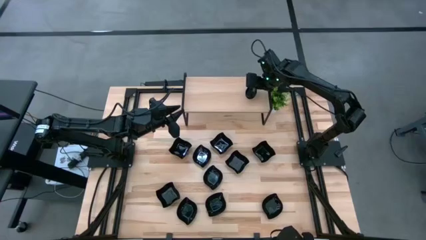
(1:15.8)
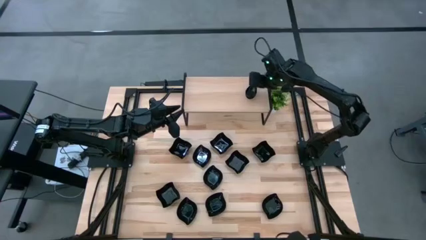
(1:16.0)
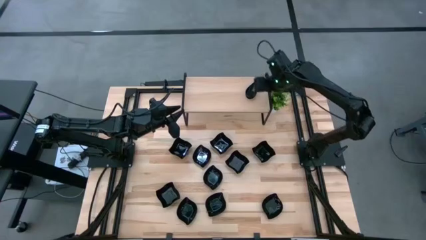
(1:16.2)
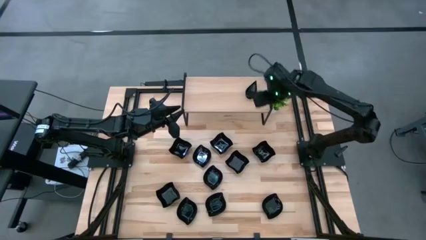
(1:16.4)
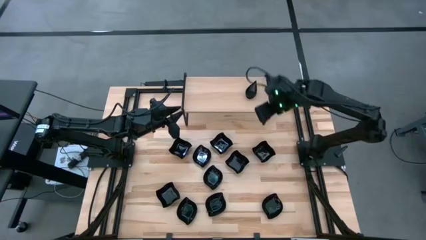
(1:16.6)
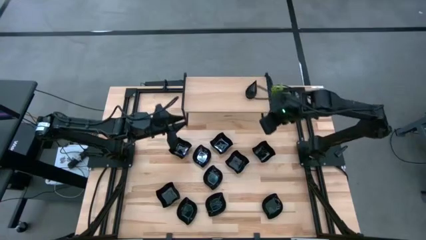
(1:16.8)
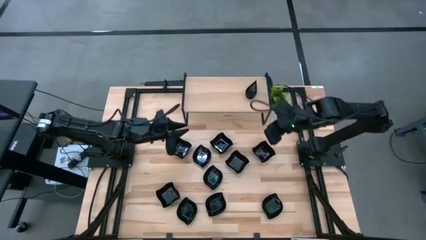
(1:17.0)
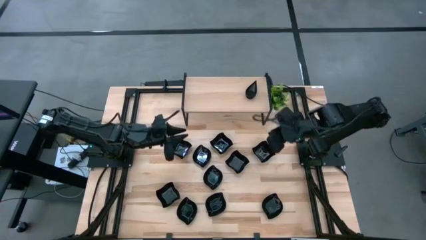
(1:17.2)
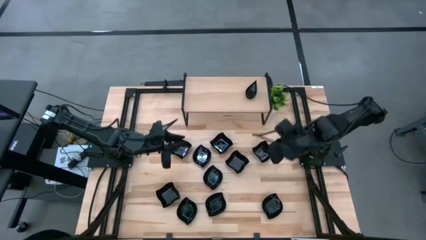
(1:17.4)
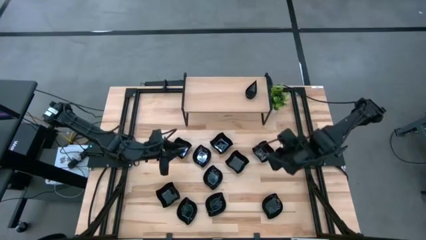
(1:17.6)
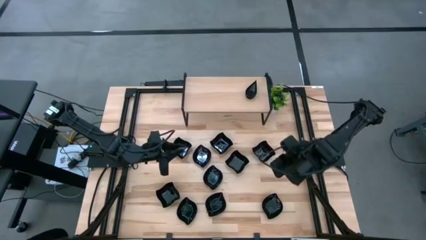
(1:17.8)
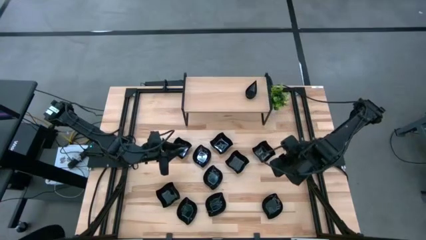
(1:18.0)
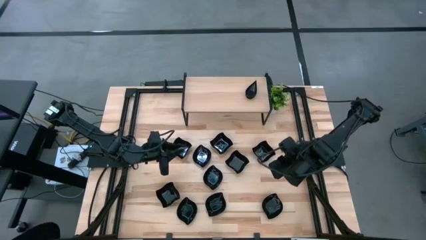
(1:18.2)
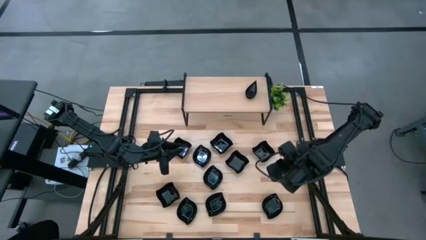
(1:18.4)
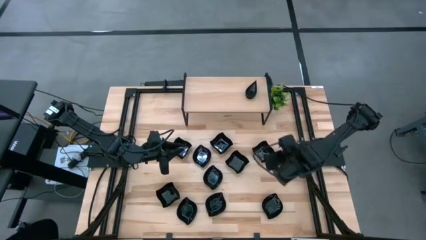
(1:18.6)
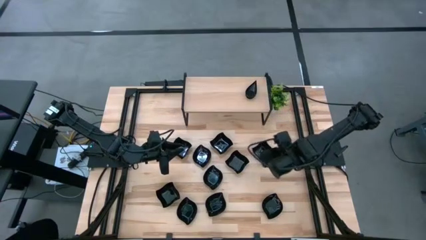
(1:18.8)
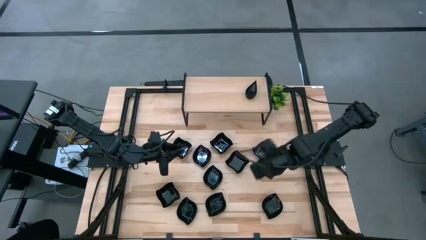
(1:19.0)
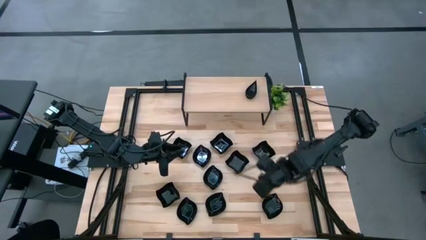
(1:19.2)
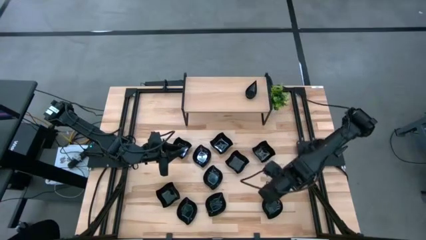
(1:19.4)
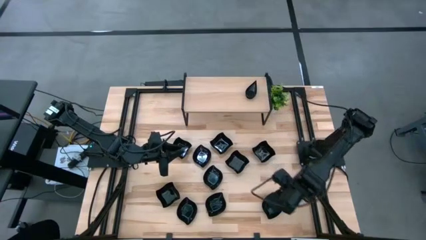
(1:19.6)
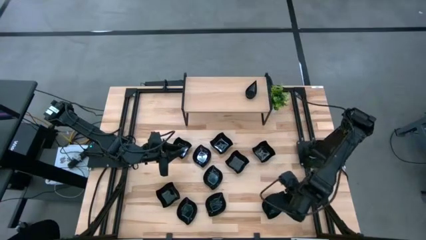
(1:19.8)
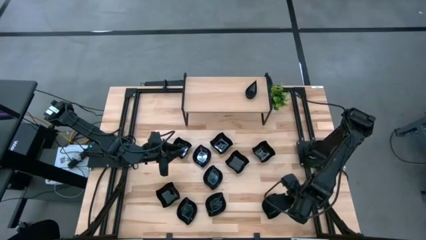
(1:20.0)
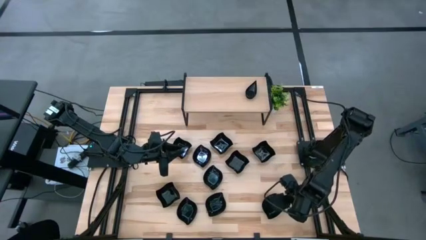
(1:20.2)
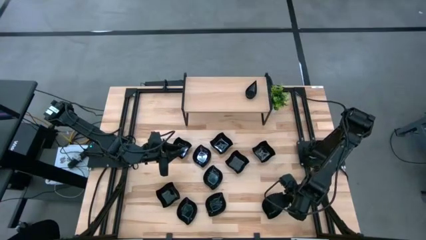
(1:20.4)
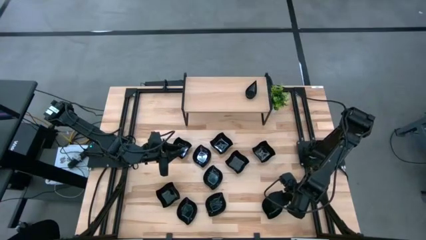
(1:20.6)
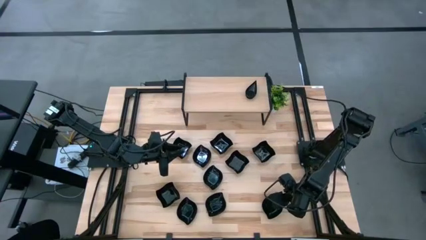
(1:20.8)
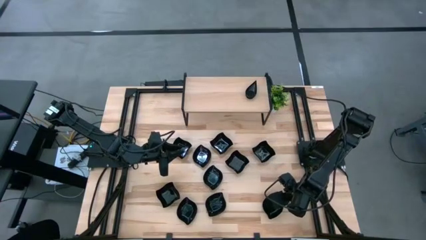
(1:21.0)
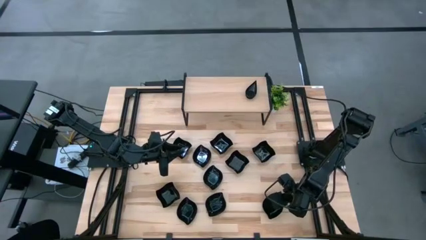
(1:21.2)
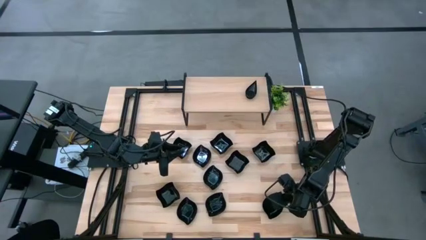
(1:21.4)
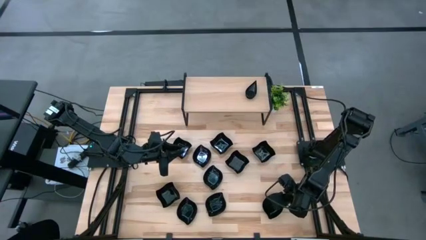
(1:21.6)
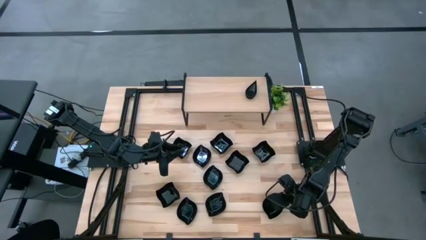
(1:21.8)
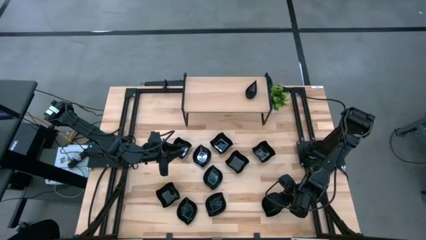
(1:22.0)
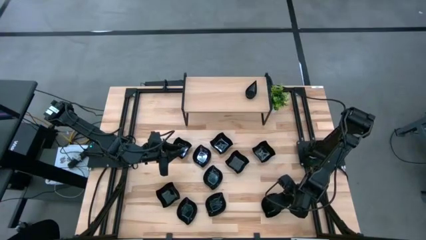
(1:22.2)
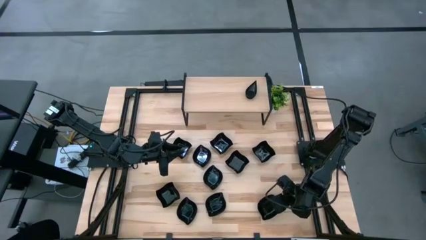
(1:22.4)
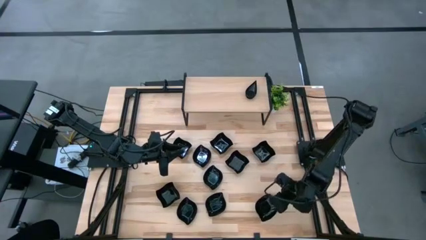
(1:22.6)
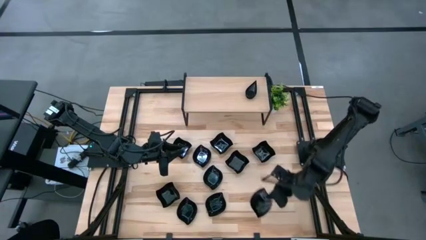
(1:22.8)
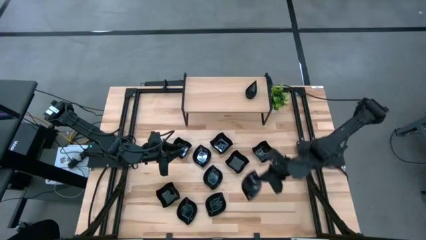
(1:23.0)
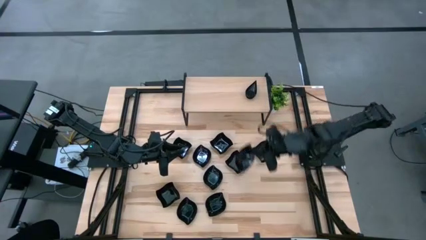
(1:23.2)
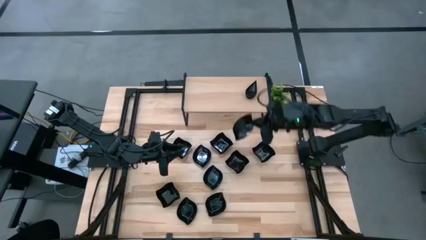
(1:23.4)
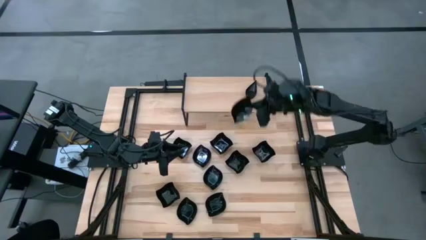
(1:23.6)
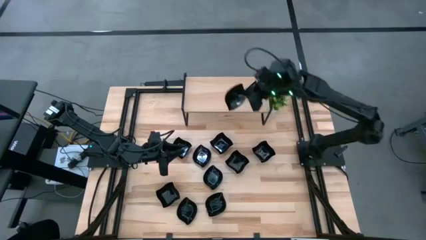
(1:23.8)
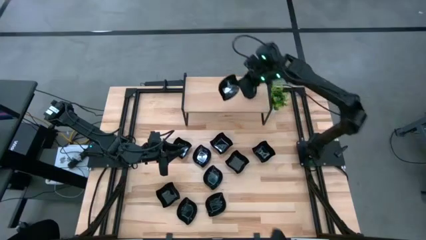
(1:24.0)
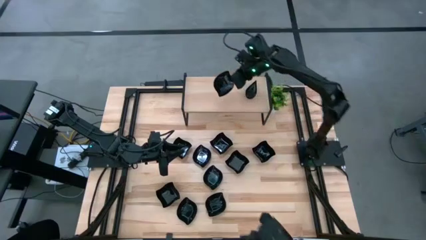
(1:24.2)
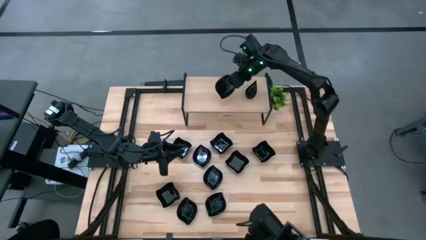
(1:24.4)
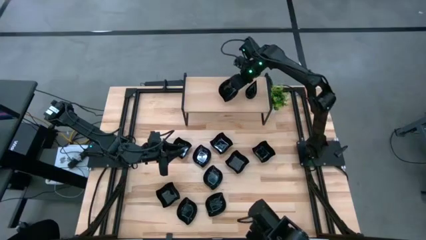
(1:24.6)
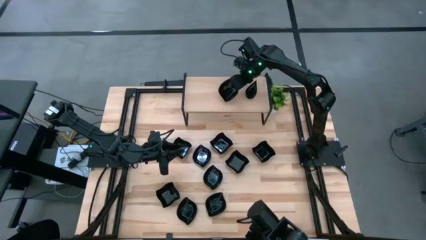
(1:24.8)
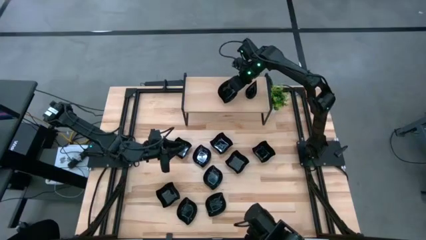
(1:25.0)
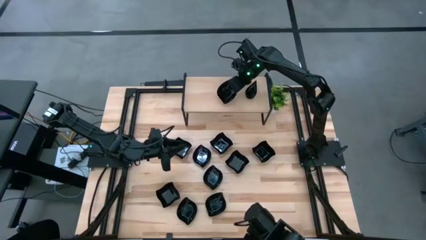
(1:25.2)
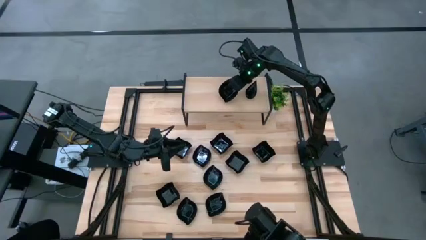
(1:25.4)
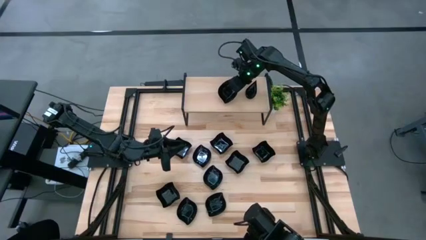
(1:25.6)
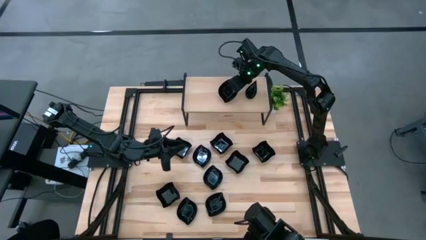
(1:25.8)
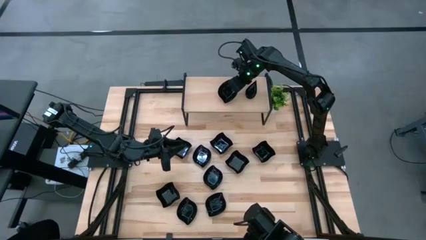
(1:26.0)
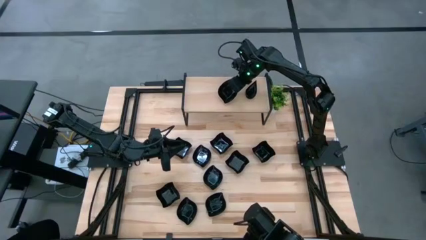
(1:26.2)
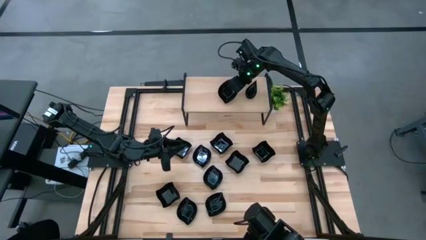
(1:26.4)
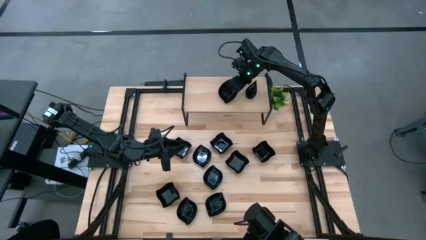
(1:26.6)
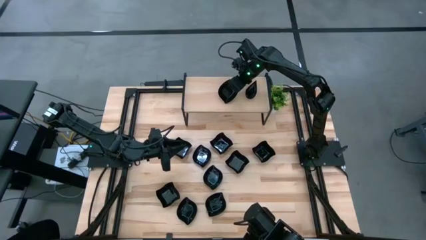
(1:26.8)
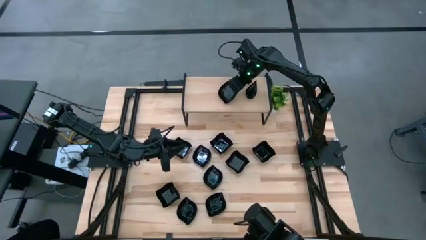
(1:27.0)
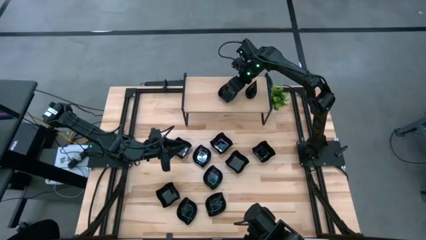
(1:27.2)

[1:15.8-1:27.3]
Task: Pick & Place Mini shaped plates
Put the black leaf shaped plate on the shelf

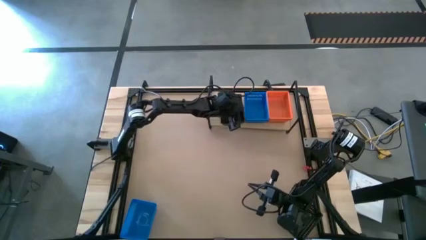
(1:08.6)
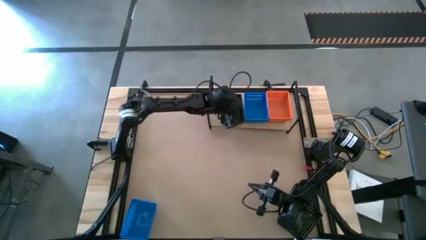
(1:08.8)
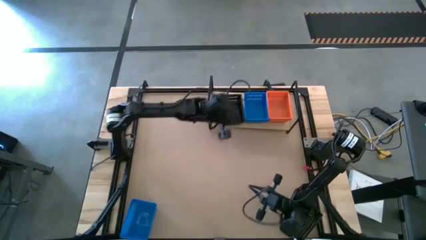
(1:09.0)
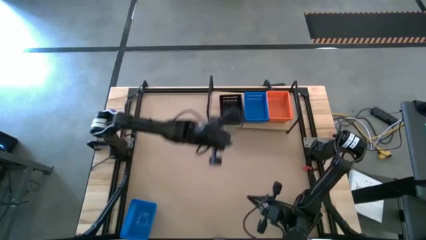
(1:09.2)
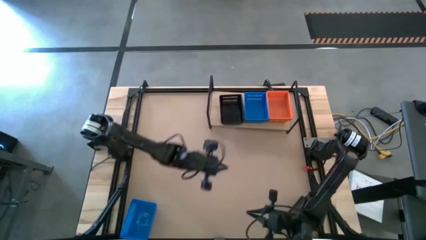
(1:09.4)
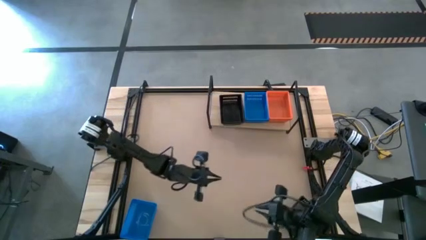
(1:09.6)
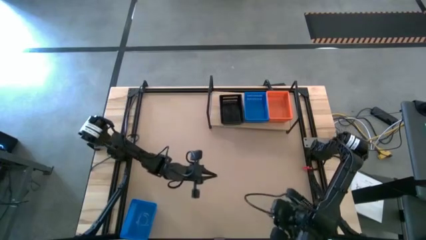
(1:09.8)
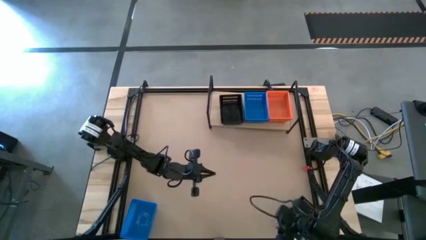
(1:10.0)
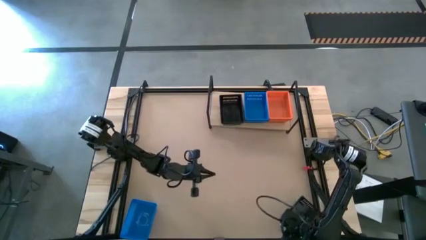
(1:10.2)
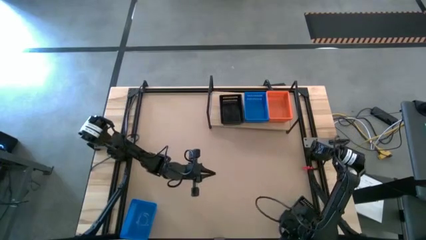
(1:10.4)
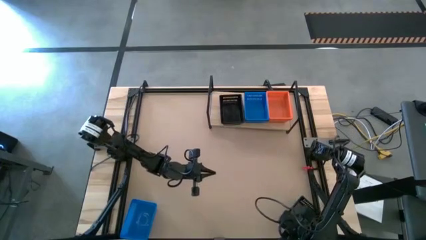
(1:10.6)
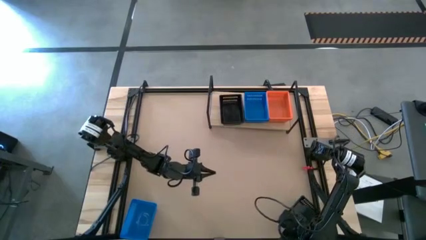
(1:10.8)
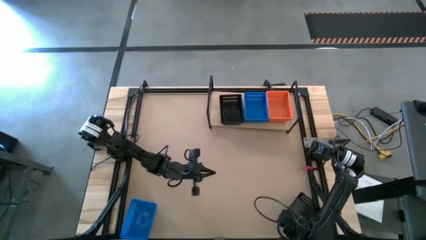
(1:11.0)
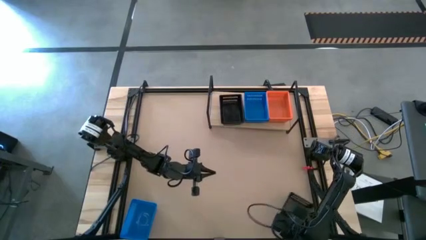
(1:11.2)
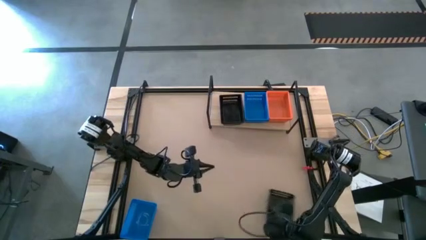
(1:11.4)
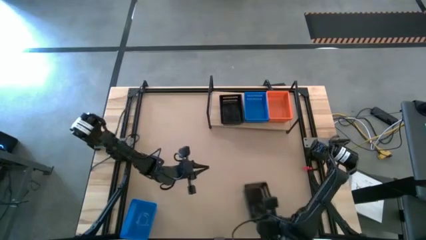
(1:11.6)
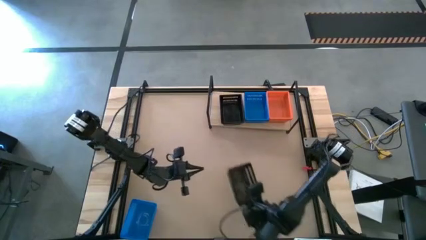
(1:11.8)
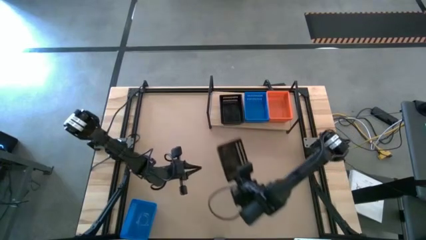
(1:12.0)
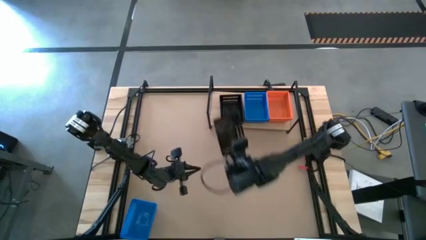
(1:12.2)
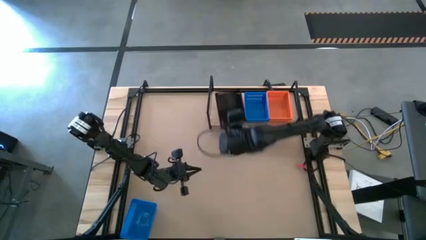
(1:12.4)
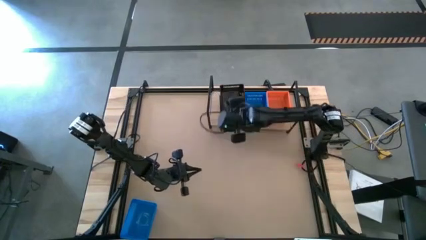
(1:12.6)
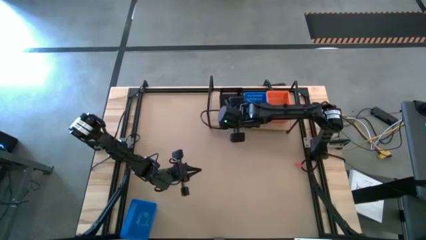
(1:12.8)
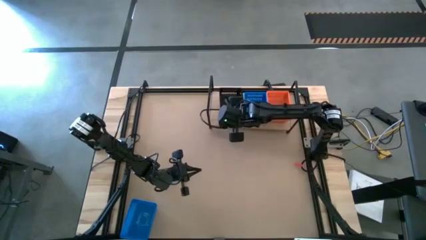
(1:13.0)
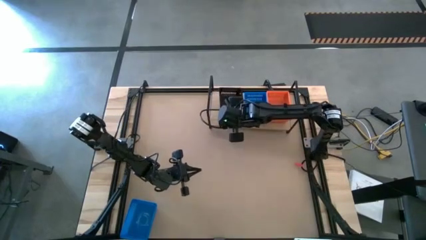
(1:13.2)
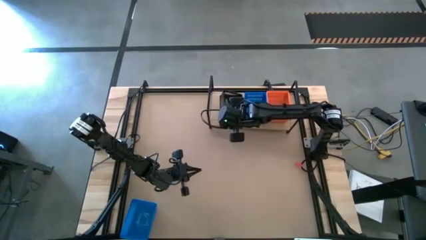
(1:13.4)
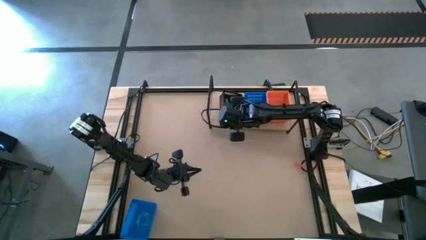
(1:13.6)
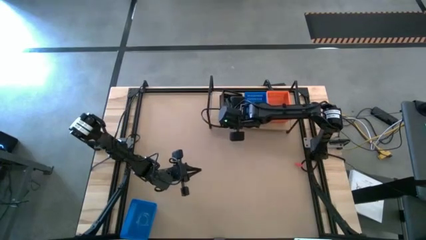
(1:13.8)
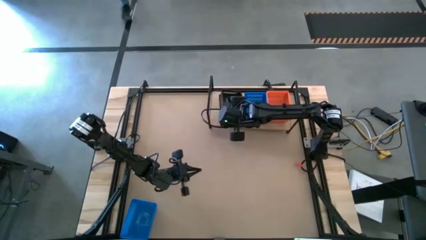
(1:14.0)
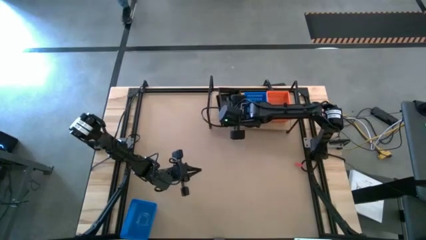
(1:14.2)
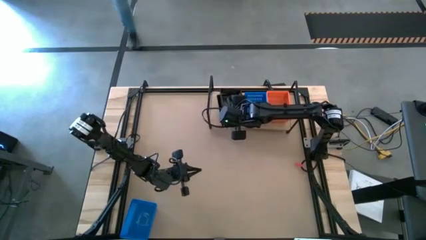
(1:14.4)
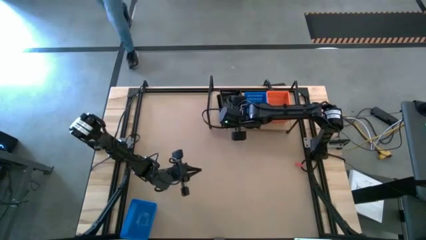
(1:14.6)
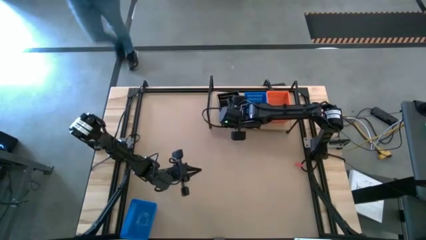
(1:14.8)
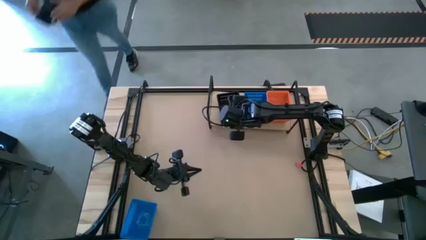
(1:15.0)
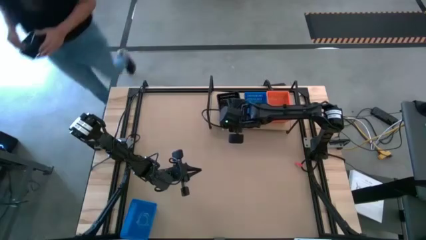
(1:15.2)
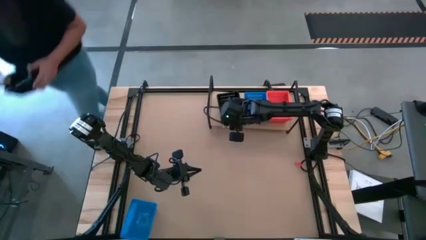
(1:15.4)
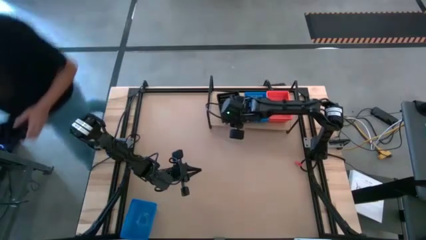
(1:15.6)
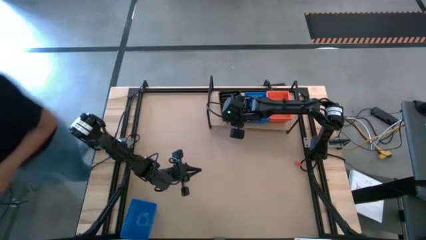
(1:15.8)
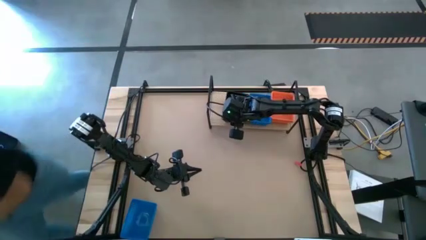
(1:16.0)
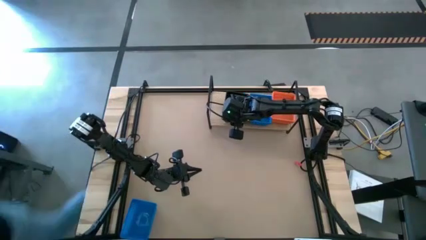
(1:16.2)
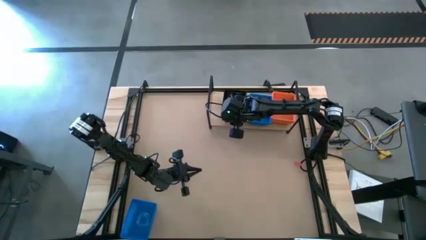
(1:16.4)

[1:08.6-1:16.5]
Task: Stack baskets on shelf by color
Stack the black basket on top of the black basket on the shelf
